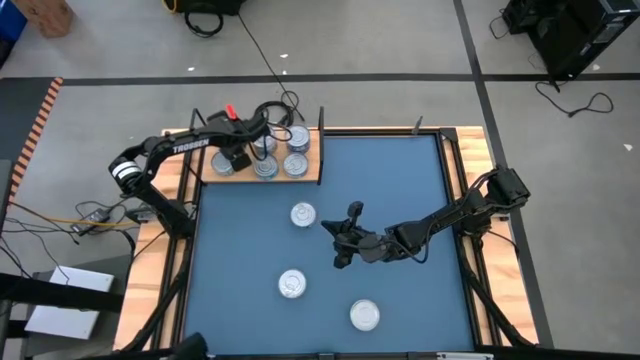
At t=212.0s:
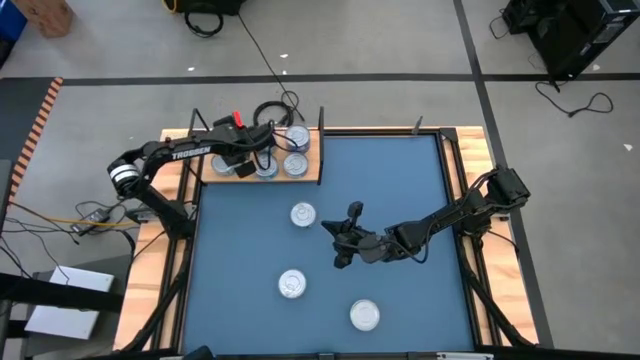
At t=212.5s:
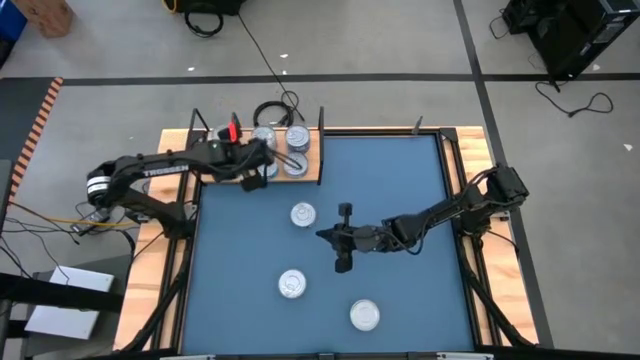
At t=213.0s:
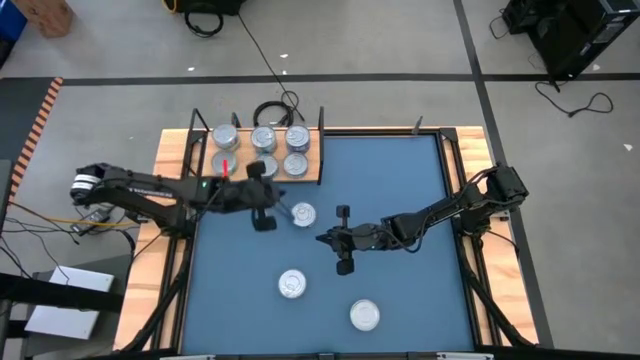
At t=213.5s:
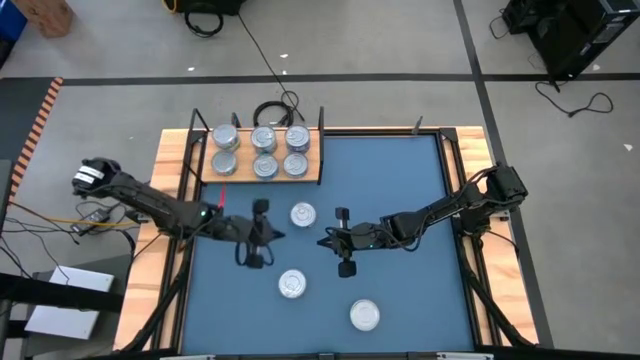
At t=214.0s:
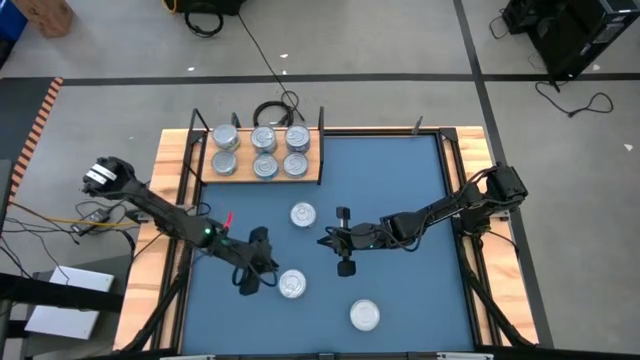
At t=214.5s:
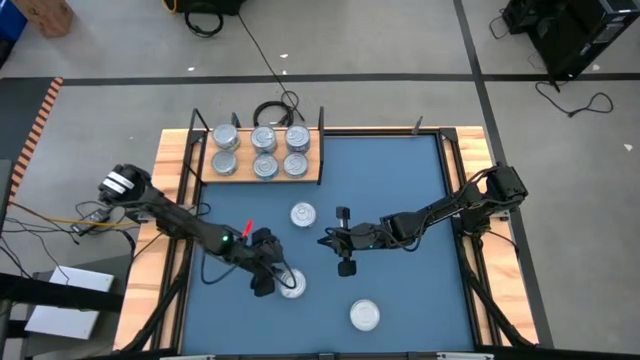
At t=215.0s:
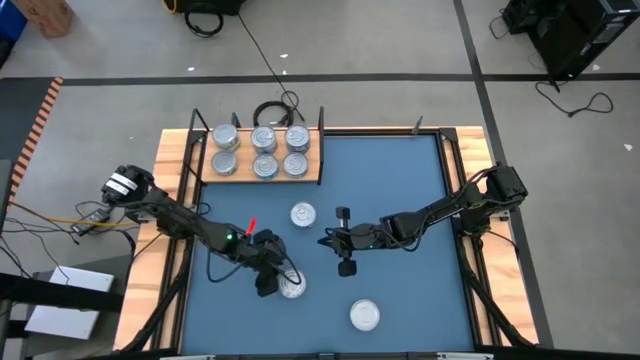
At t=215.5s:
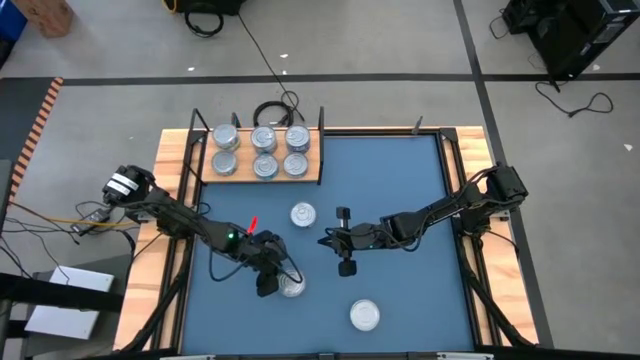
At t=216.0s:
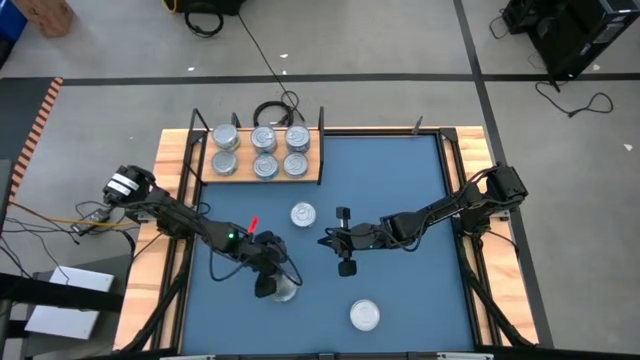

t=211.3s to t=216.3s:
Task: Stack canned seafood by type on shelf
Stack the yellow blue tuna can on top of the other yellow blue tuna can on the shelf

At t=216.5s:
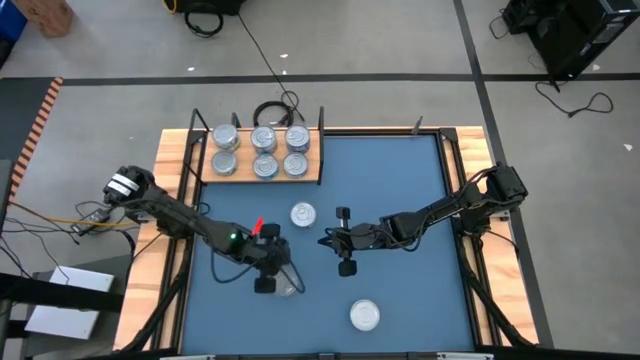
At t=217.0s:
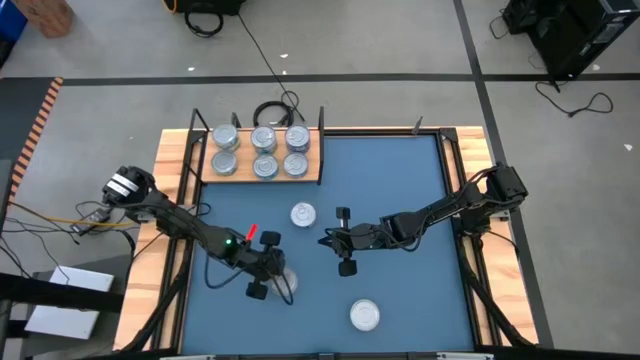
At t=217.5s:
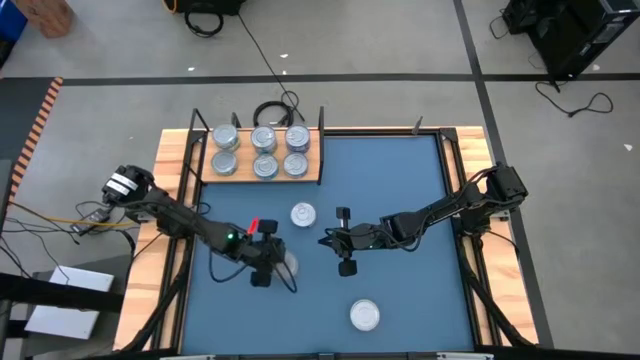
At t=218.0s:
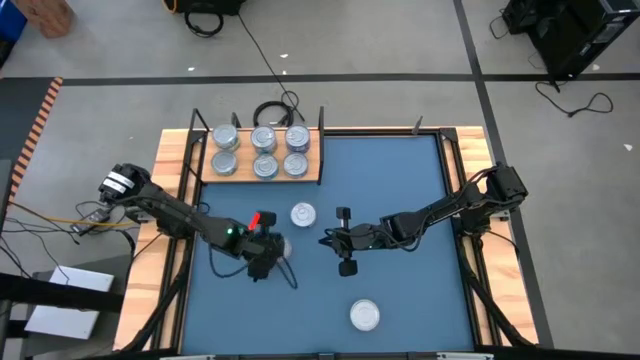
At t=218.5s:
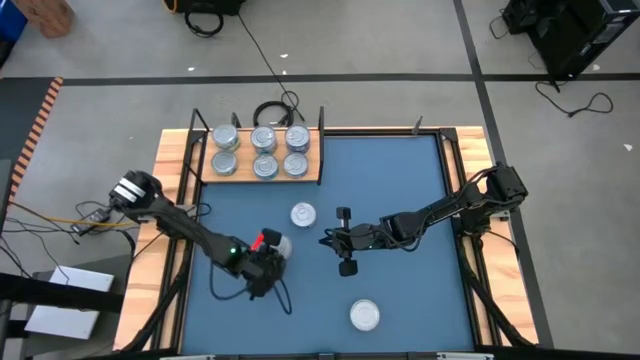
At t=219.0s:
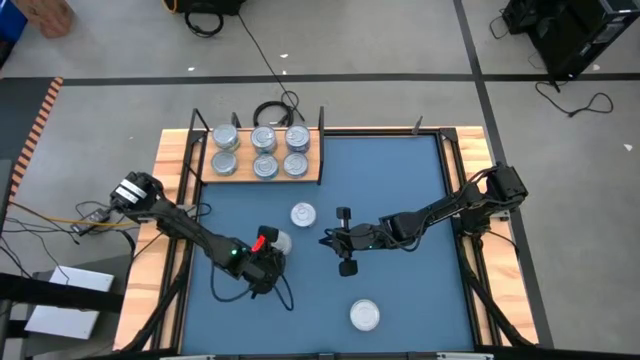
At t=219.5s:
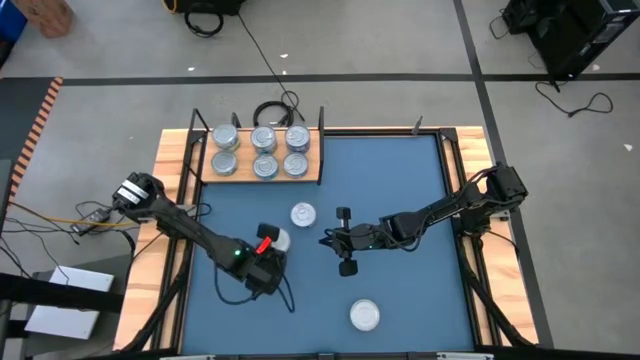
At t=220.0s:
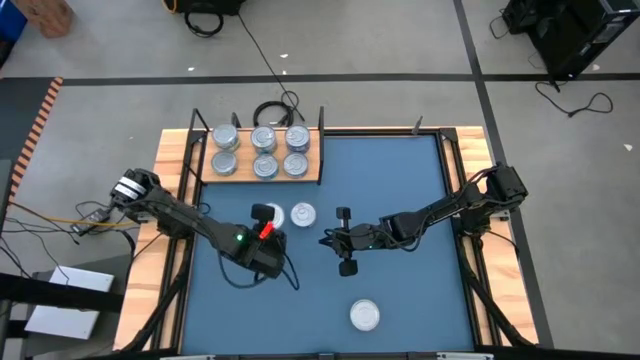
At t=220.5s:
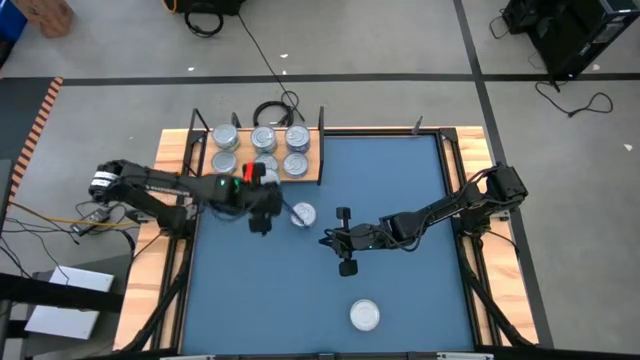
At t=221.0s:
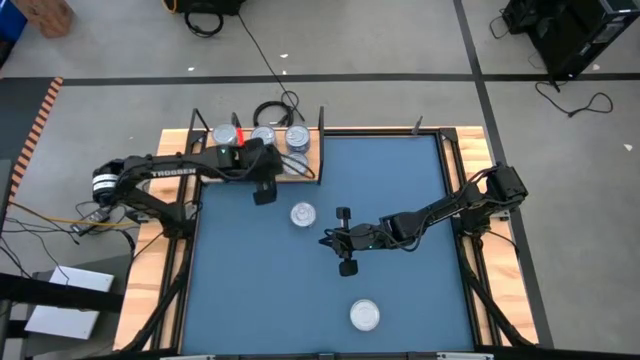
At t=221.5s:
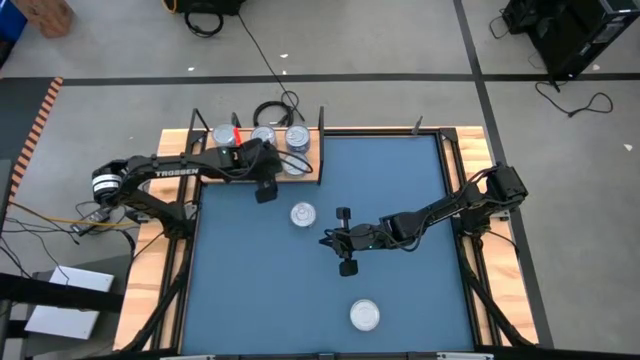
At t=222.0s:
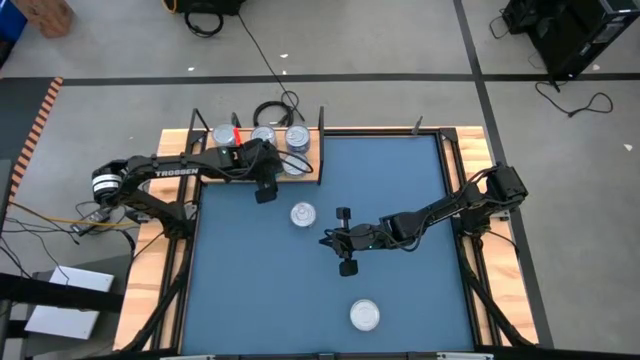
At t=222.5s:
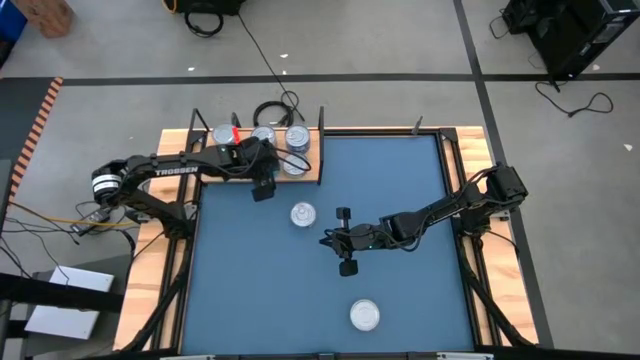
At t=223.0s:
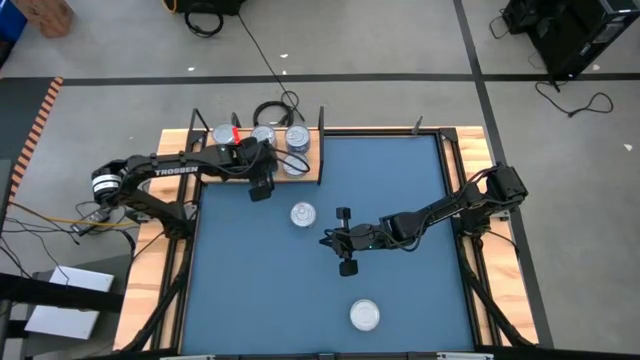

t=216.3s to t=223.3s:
Stack the yellow blue tuna can on top of the other yellow blue tuna can on the shelf

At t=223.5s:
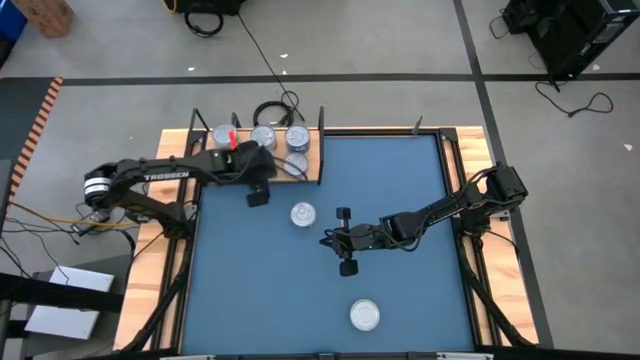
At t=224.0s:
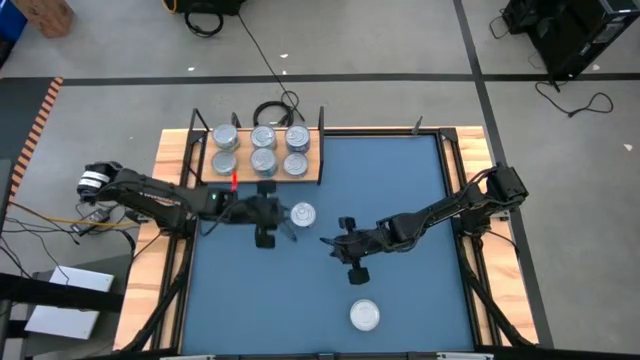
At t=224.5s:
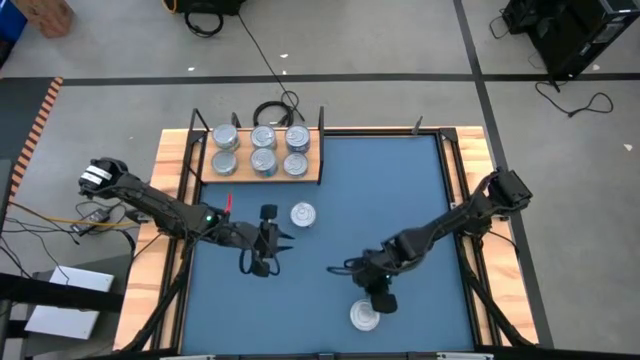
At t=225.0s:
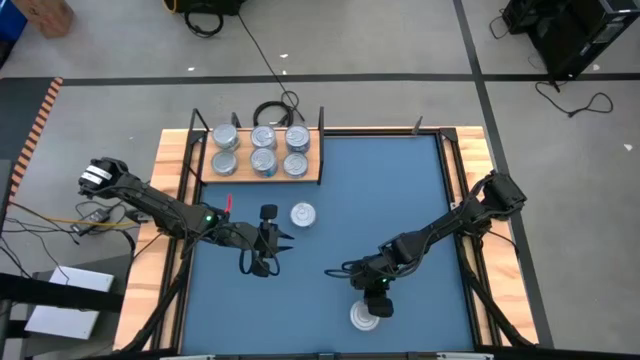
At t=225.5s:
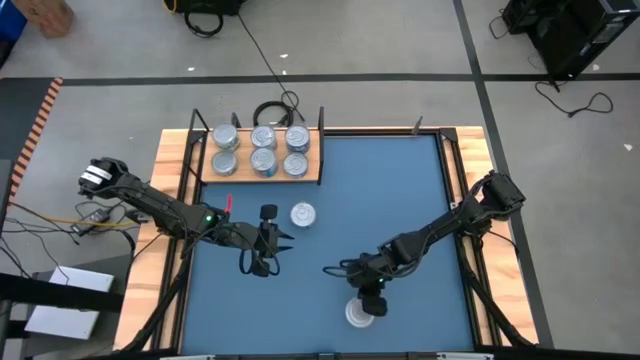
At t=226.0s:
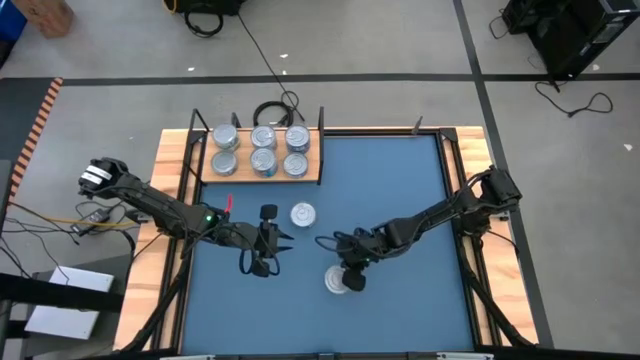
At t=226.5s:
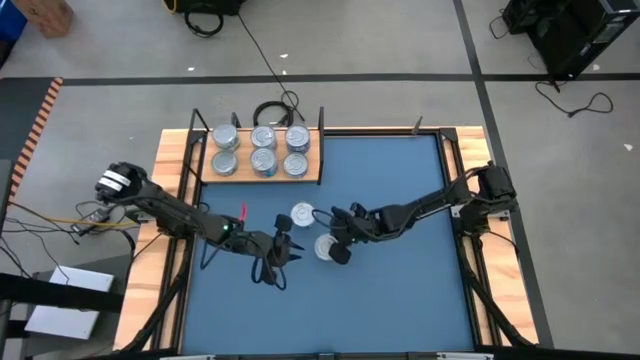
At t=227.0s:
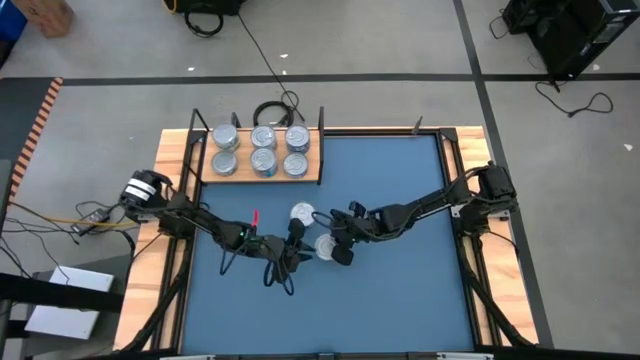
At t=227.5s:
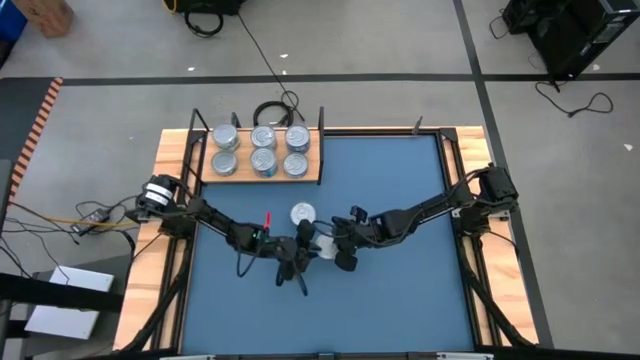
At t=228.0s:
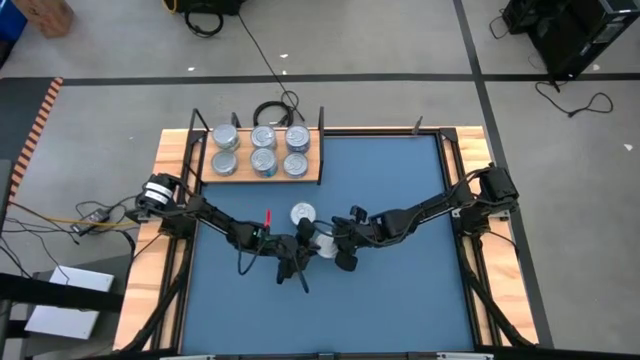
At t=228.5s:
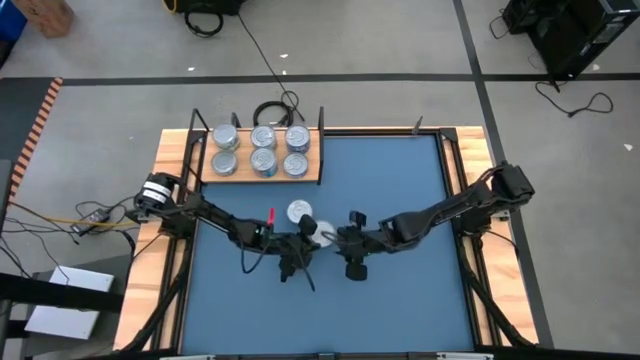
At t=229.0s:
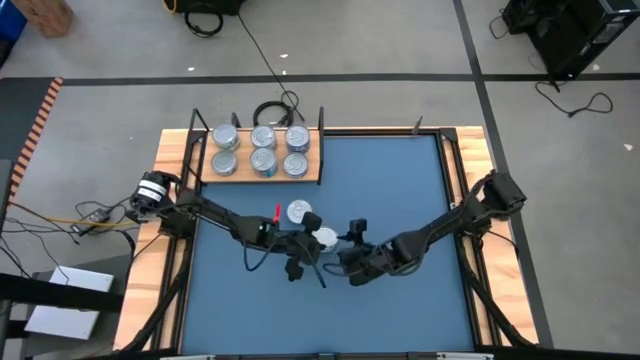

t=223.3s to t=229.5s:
Stack the green tuna can on top of the other green tuna can on the shelf
